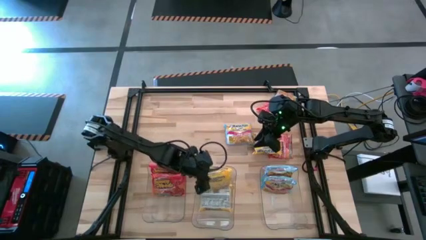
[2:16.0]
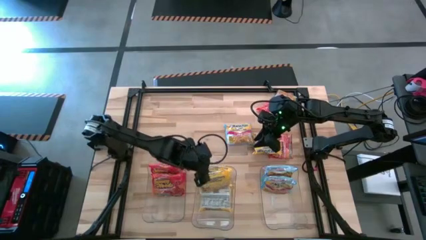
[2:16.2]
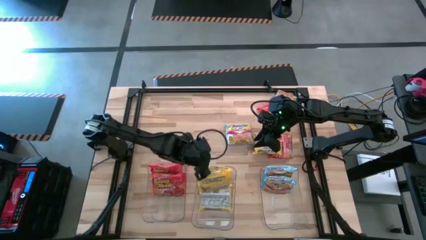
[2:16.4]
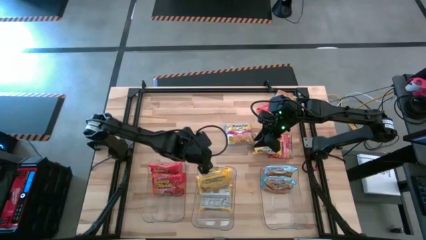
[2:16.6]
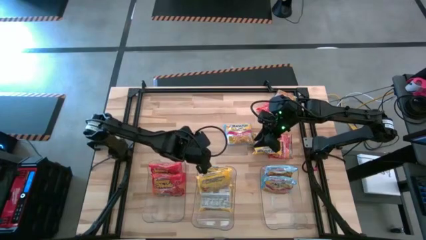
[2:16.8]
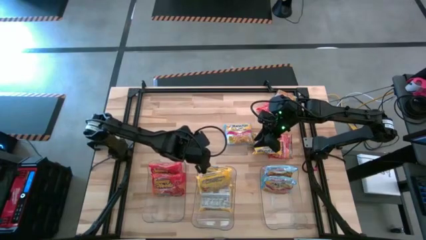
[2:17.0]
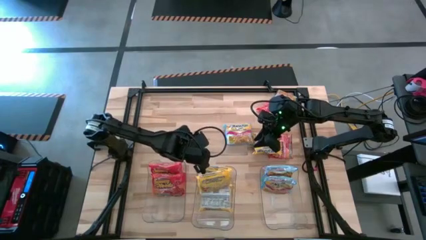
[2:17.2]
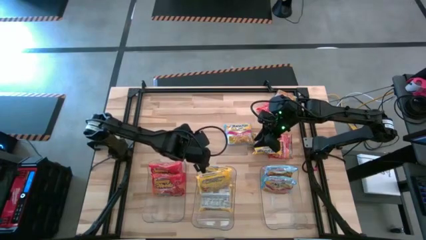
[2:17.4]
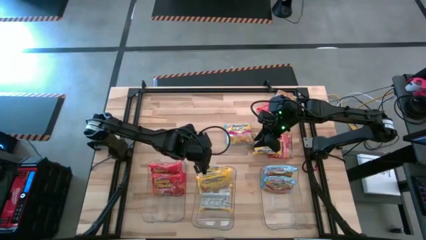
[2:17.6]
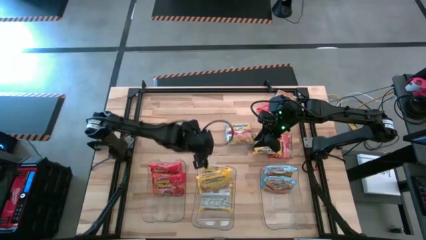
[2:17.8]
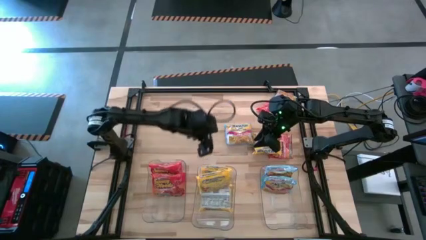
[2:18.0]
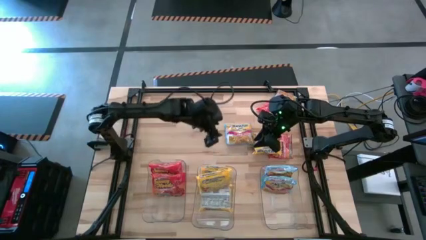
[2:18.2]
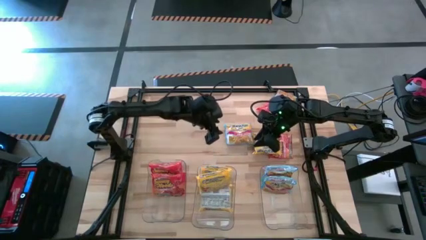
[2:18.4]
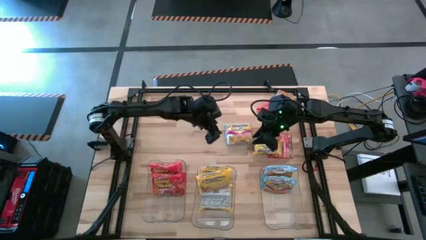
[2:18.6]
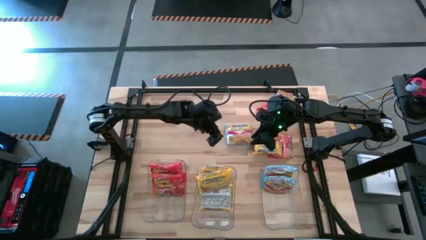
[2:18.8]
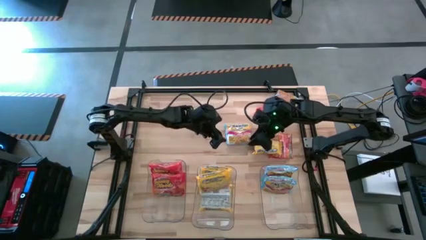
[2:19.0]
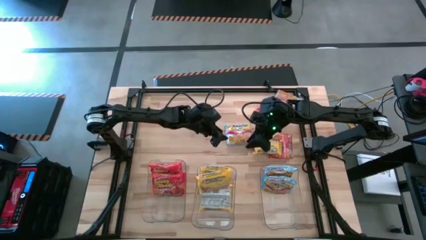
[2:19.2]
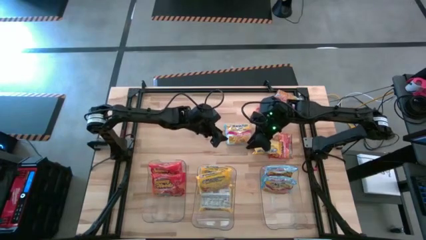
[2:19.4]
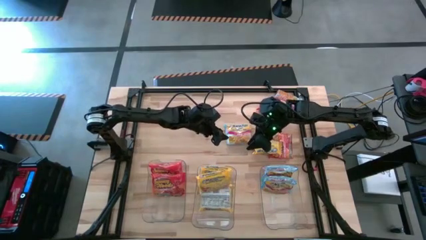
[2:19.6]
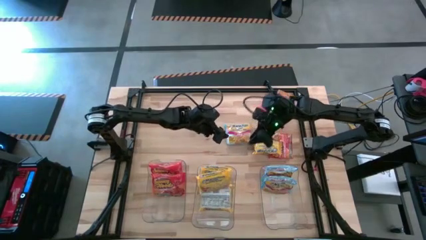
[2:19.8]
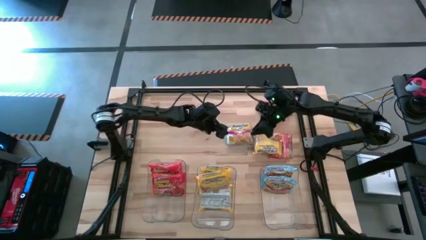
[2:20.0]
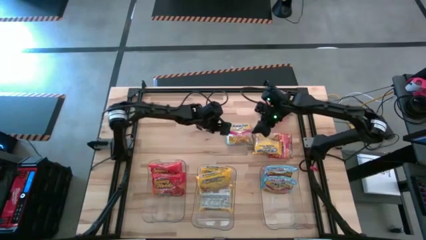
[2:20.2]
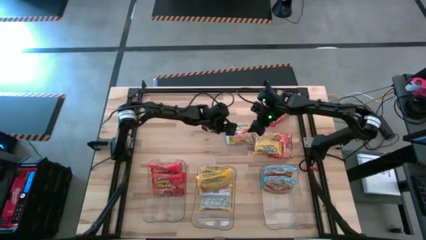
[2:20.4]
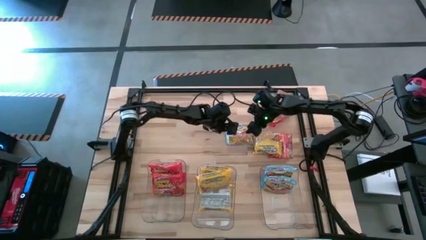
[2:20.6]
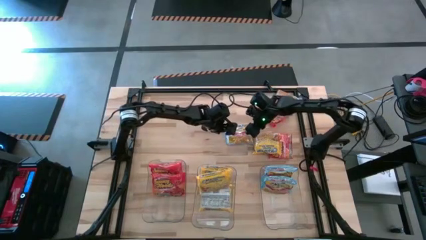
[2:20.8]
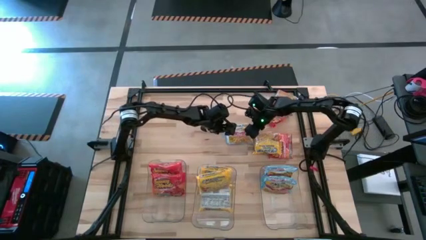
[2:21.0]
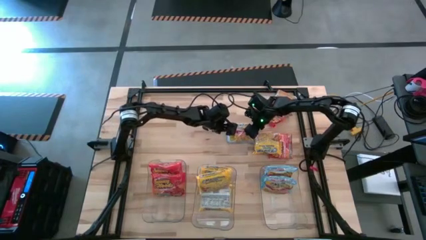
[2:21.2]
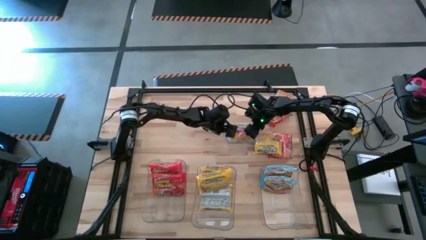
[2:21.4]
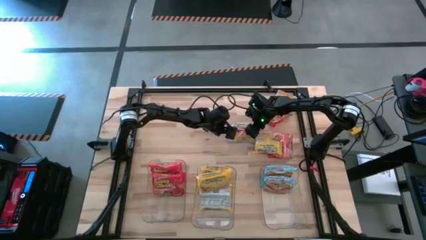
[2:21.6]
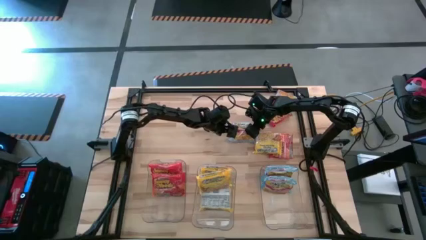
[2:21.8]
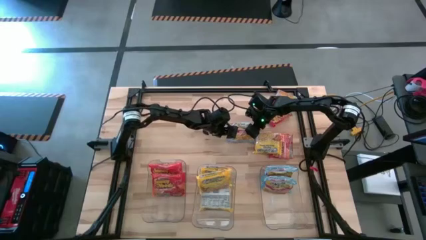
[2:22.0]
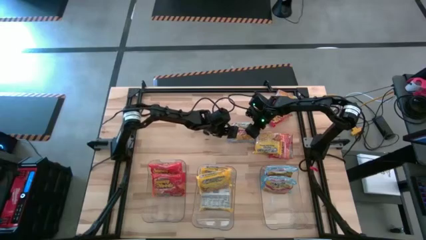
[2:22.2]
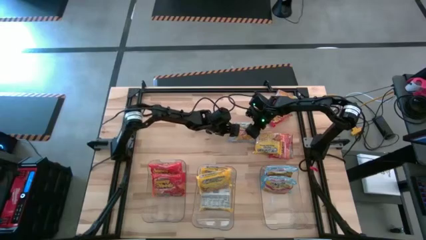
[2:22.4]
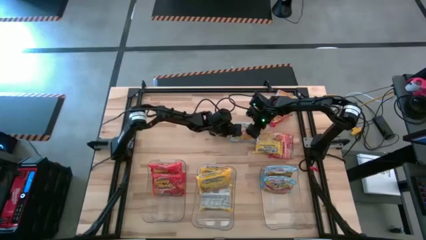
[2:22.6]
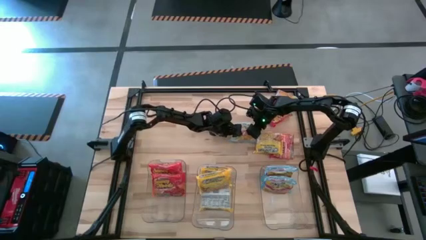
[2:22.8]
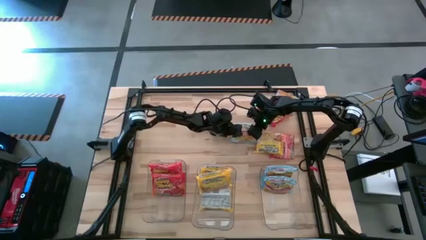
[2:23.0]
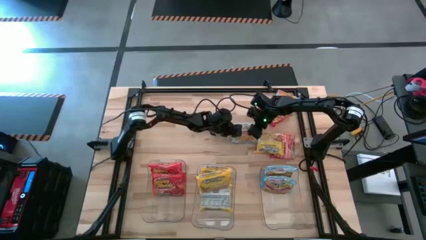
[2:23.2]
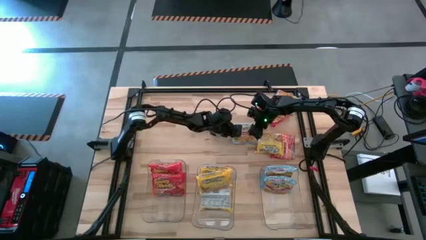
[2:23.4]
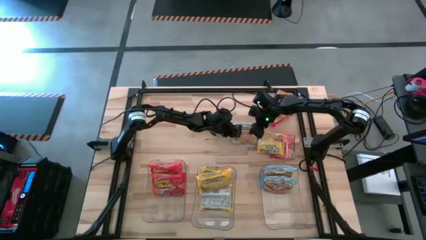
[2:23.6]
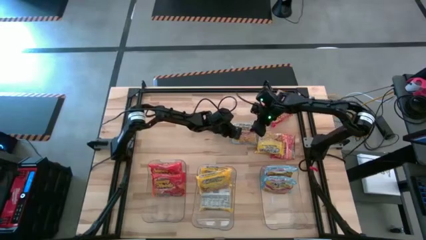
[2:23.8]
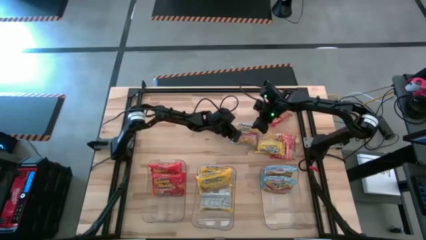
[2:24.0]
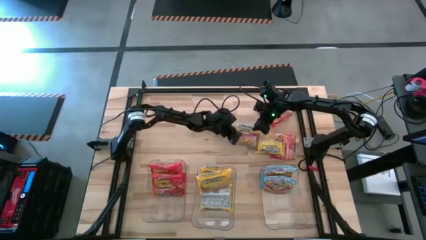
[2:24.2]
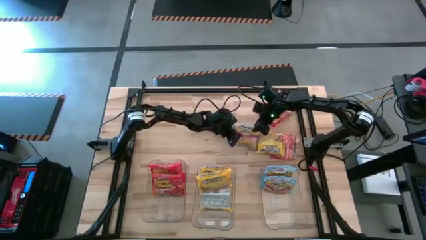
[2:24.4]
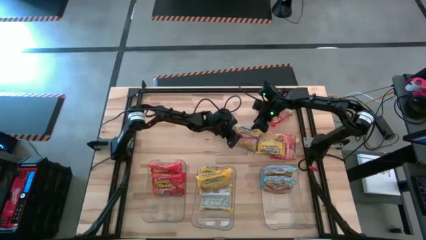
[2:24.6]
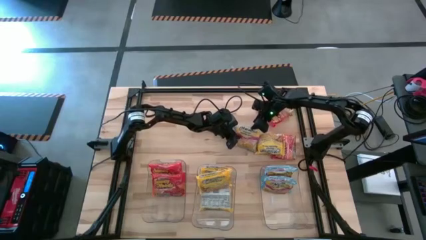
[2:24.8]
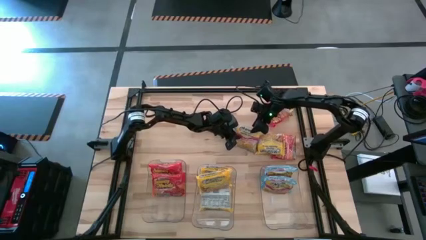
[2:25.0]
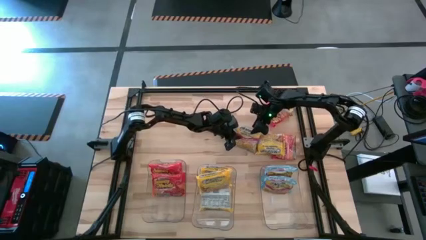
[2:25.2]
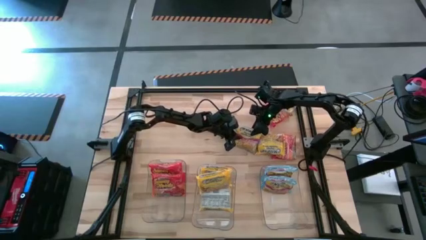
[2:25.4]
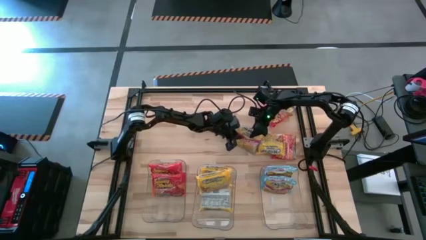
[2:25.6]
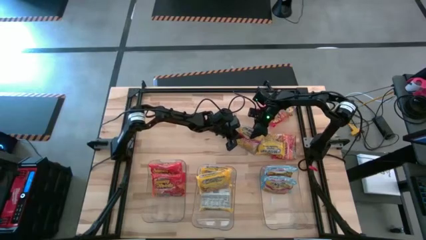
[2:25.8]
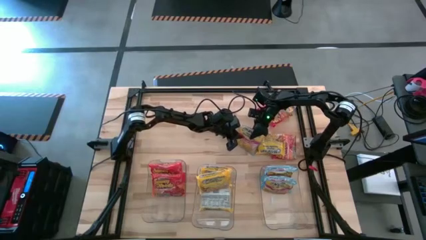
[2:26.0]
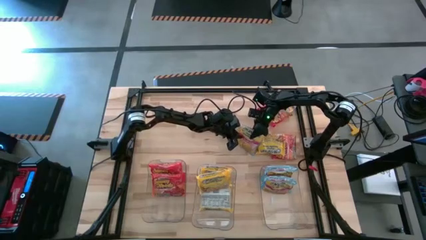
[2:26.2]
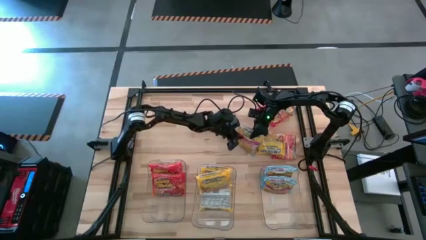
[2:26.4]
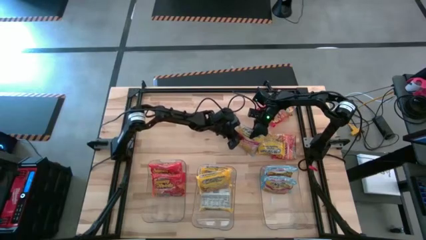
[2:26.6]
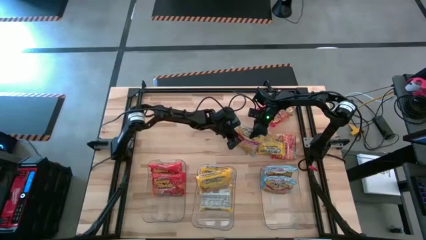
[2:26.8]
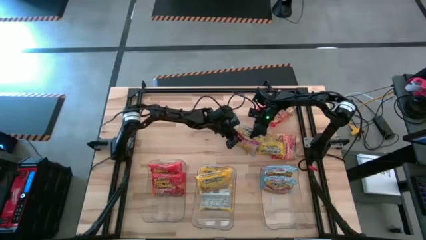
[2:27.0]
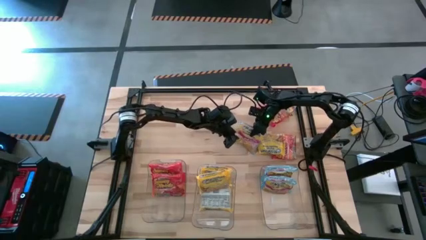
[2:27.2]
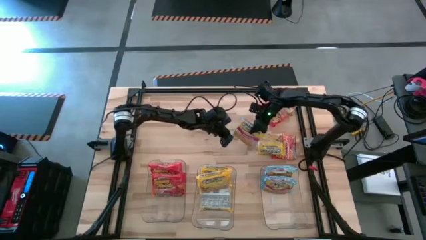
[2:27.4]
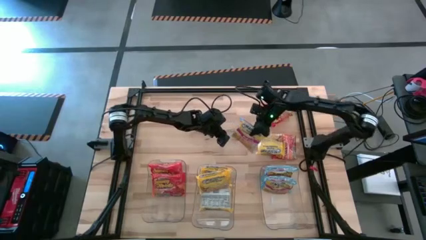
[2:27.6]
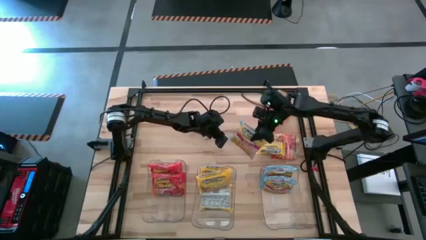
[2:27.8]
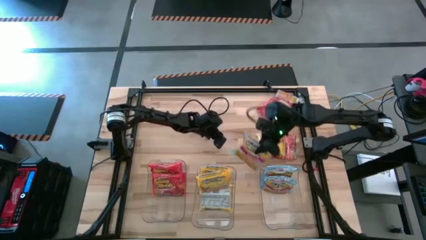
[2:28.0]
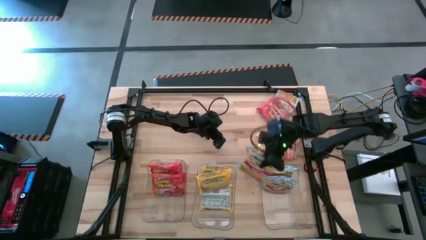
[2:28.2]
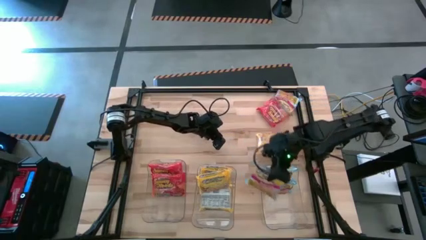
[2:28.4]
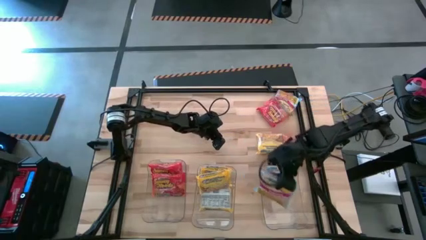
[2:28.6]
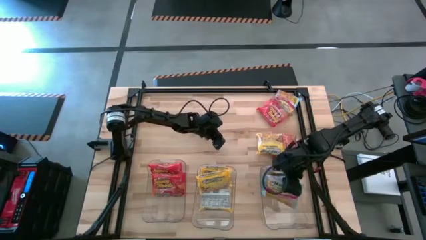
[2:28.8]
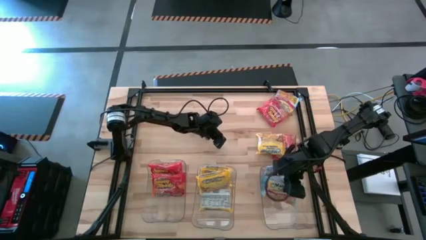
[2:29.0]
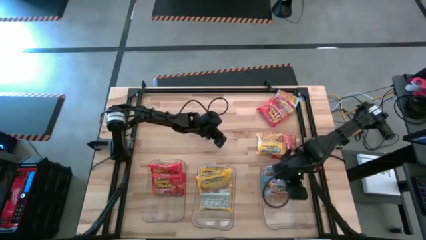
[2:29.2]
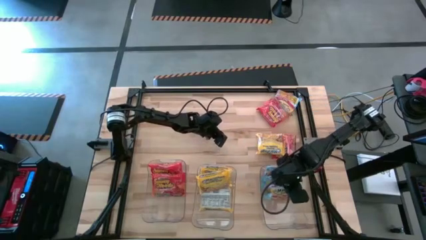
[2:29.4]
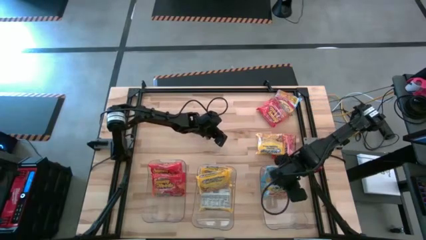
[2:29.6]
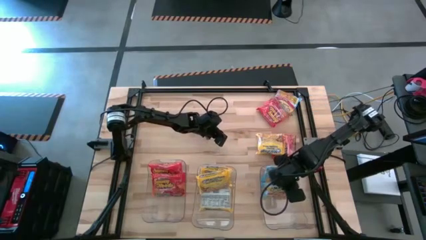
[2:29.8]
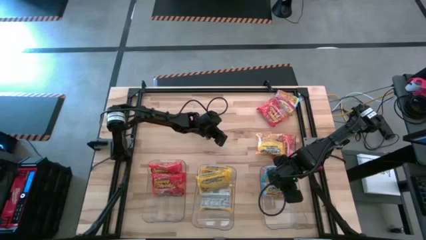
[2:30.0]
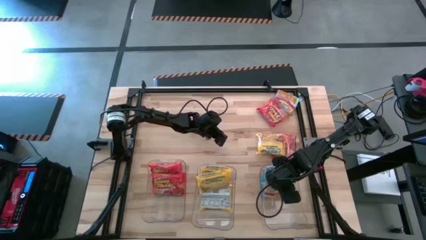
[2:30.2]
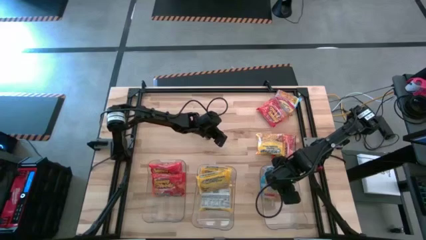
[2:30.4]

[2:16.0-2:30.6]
Task: Sort Maruchan noodles
Put the blue noodle pack into the right transparent bin
